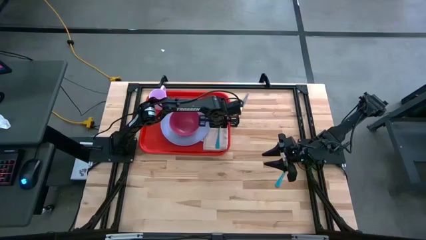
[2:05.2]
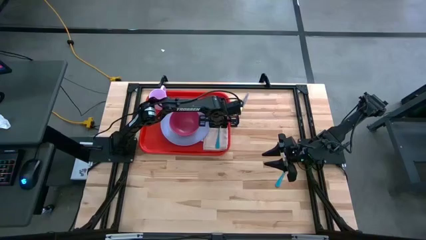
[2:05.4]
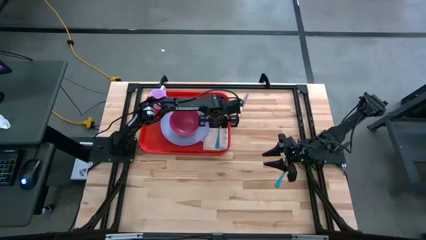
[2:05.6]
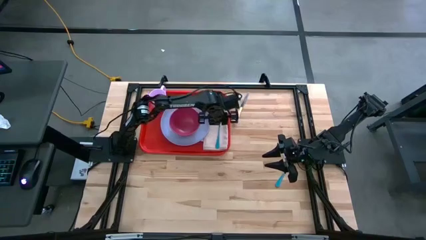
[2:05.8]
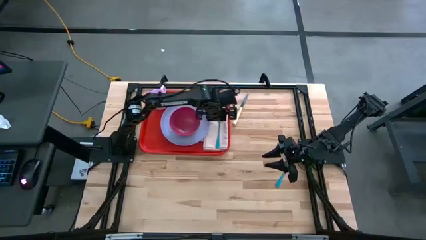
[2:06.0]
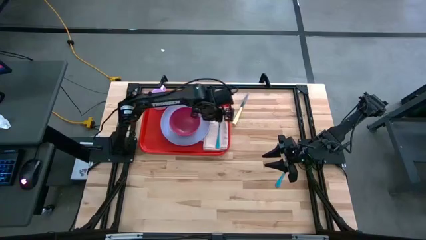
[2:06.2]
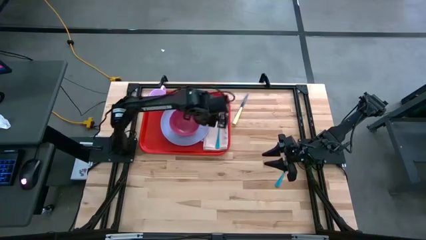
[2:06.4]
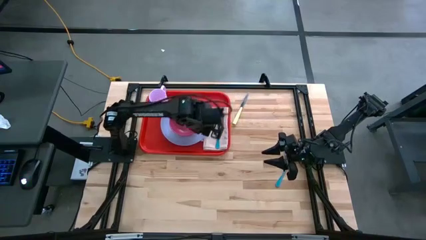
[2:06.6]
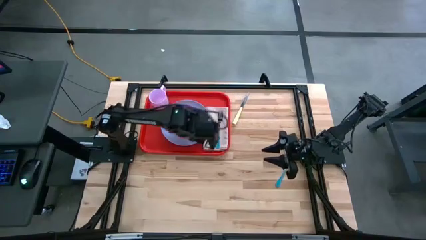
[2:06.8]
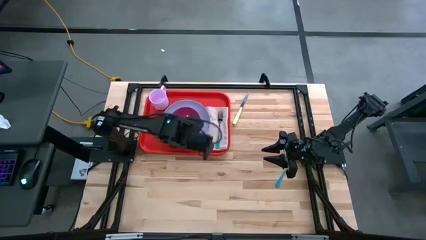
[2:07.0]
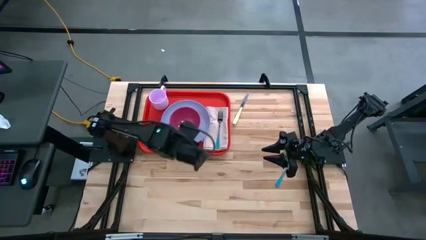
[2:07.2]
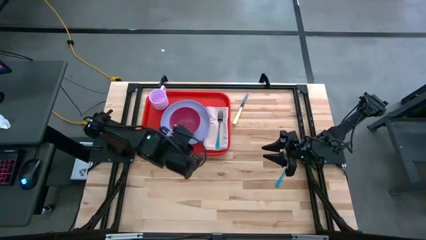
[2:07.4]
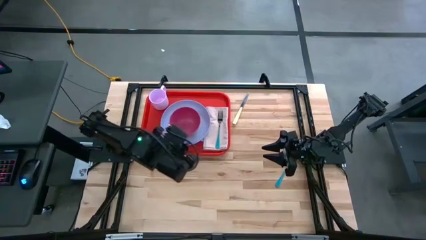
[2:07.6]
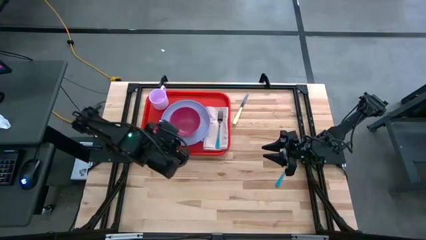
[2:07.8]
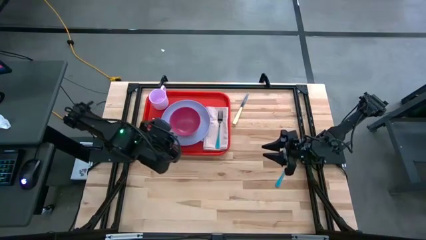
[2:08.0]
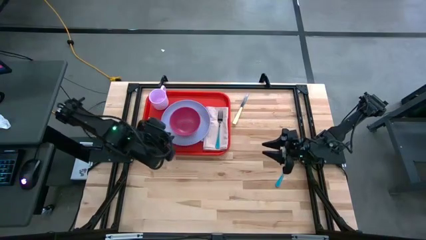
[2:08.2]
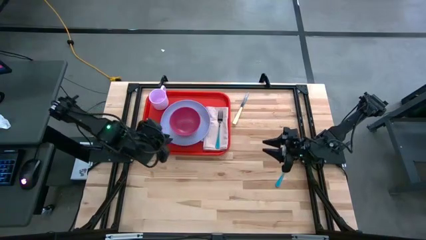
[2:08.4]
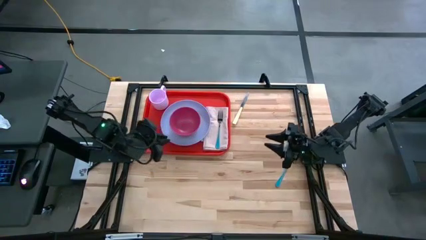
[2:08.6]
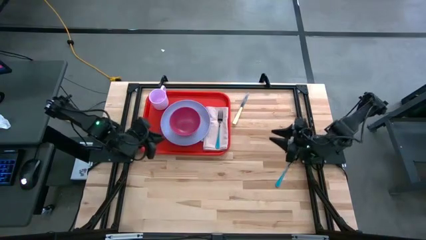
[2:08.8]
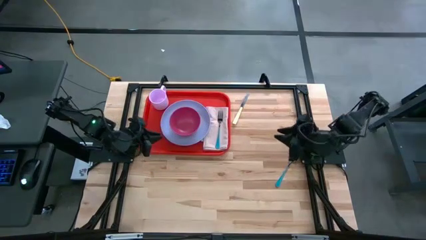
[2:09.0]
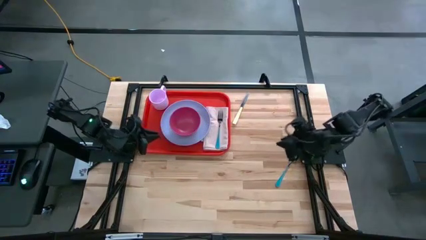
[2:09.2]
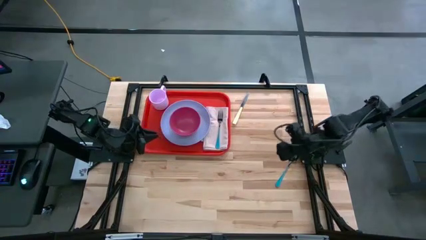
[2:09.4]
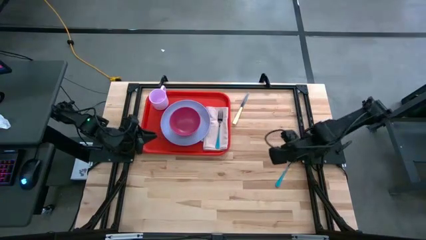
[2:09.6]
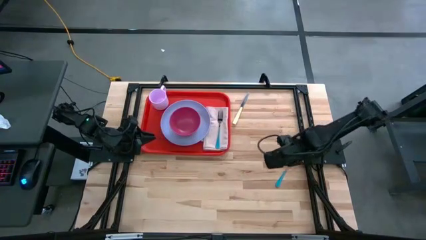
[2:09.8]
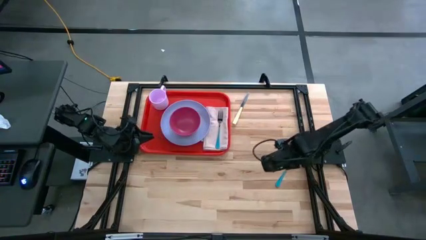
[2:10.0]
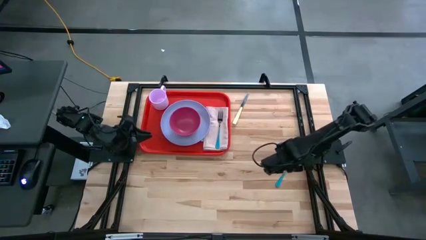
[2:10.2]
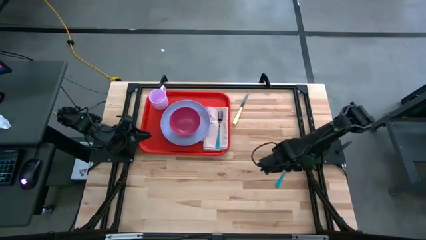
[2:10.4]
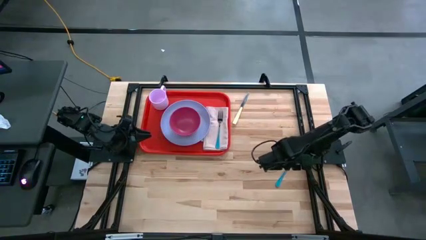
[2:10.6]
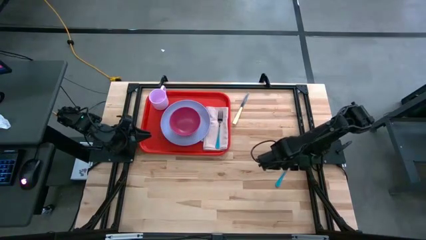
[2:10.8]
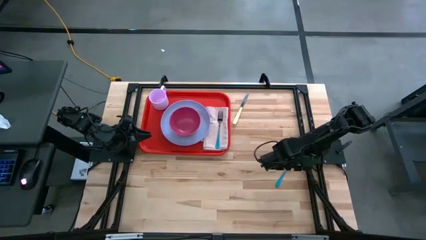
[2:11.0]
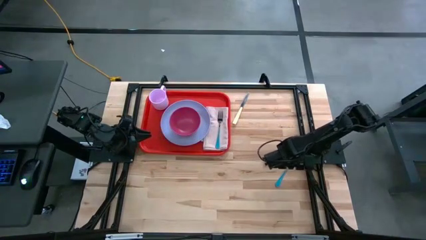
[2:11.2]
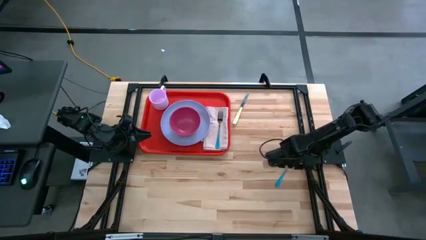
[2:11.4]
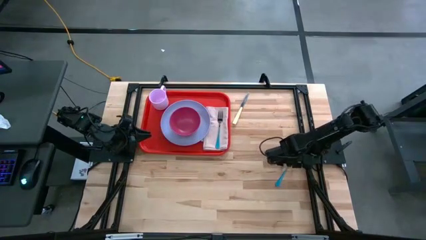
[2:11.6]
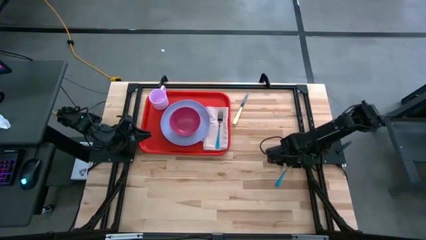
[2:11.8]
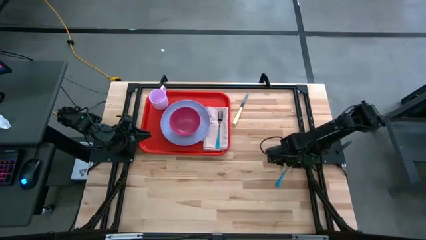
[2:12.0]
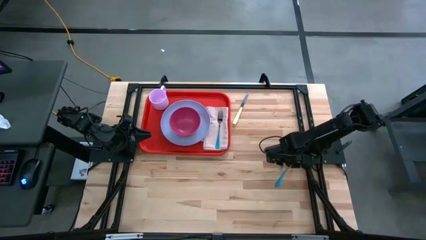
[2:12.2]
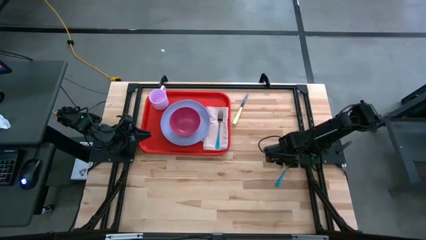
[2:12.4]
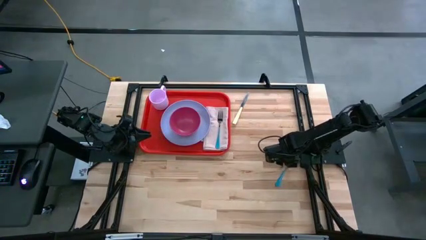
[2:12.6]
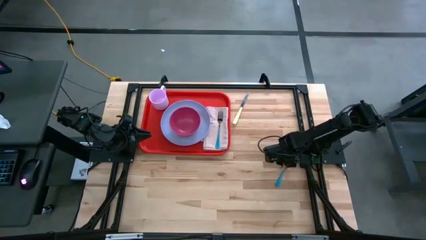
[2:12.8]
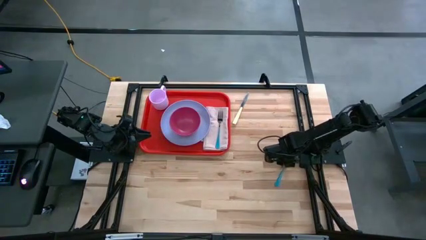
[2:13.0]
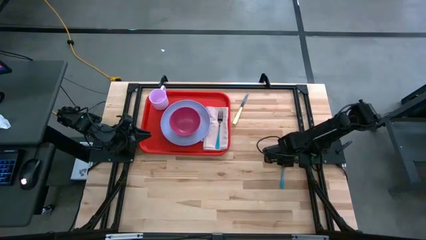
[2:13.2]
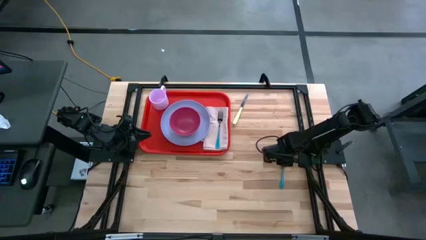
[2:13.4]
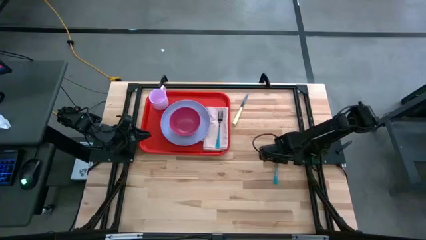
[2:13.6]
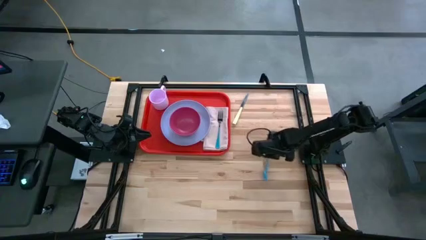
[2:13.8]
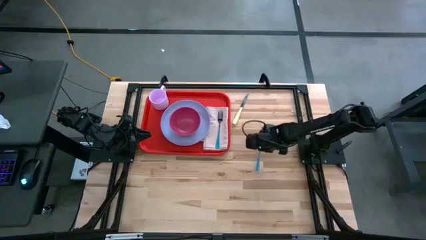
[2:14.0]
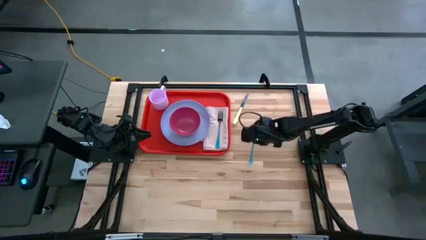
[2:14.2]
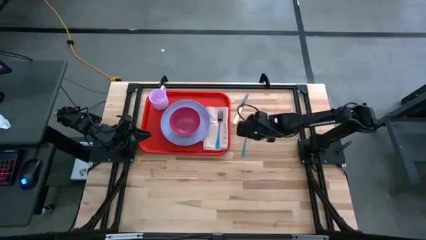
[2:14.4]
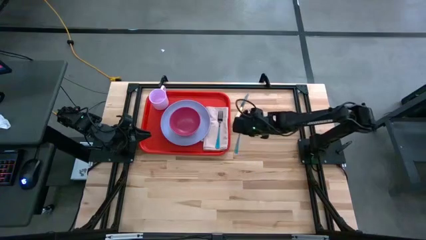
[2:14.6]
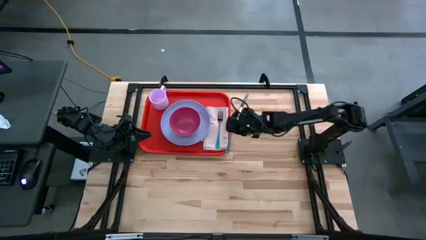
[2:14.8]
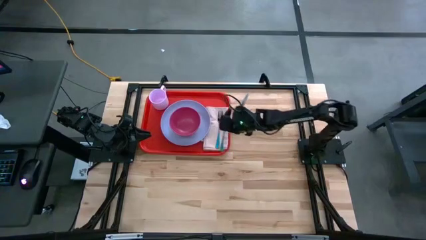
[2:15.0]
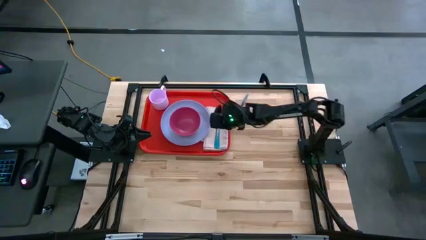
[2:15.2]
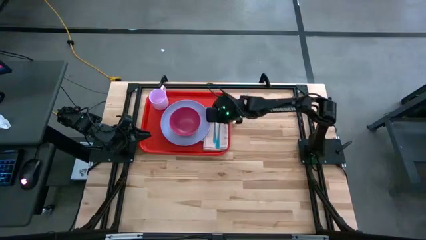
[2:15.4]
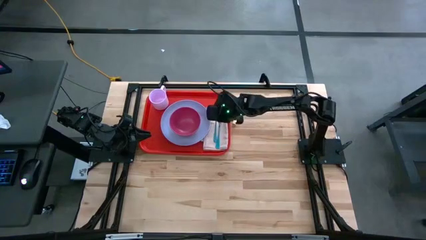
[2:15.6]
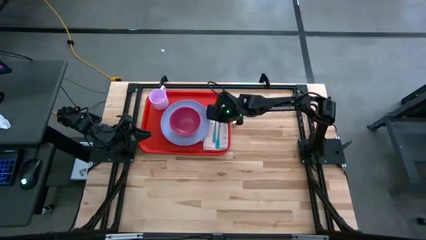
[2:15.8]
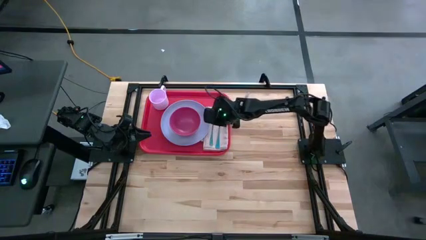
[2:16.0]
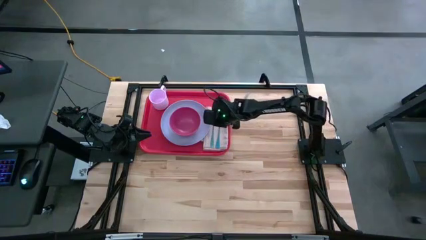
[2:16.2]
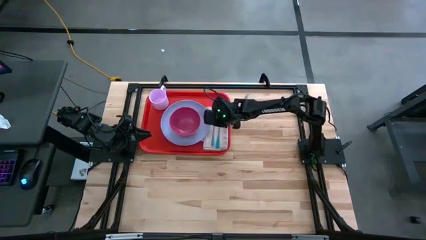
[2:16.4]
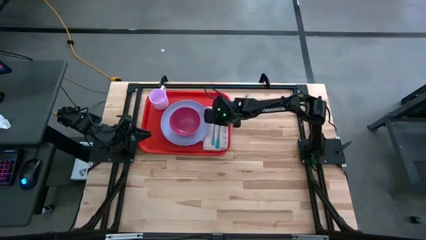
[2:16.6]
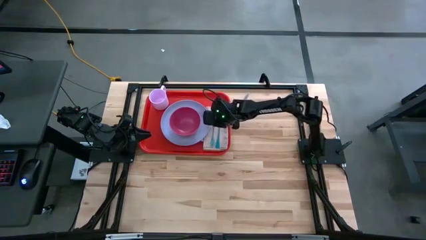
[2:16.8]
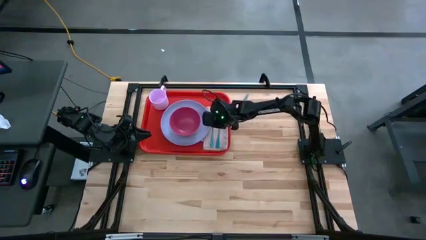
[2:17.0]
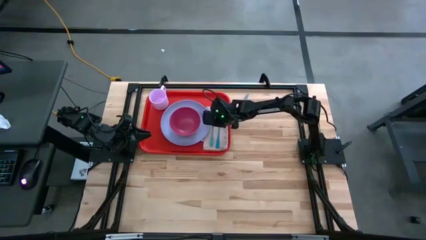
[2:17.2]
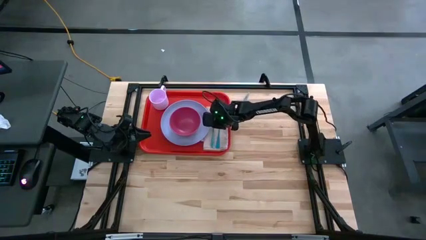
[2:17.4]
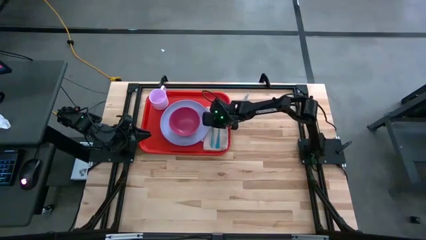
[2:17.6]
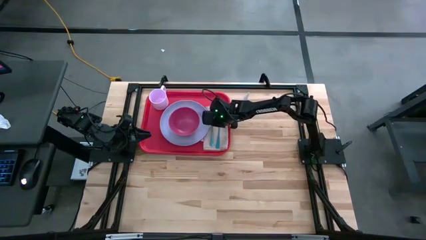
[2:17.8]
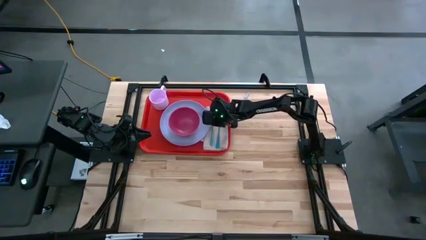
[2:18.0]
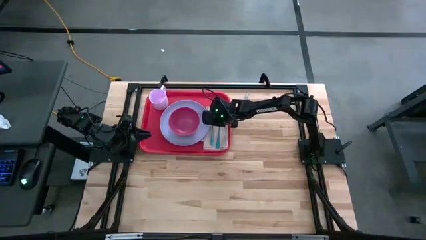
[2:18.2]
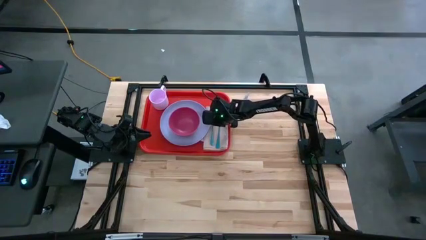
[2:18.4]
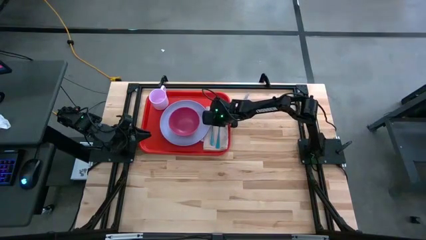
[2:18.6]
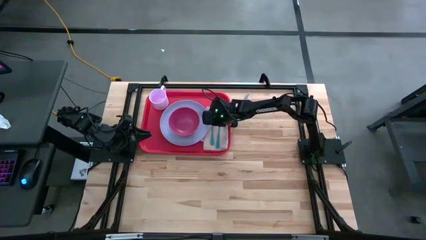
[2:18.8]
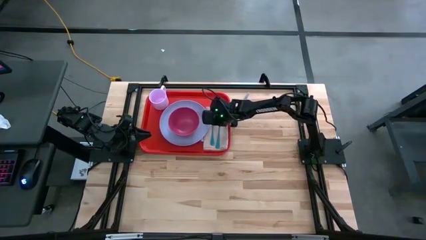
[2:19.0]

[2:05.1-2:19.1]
Task: Set up tray
Put the green spoon on the brown napkin to the left of the green fork

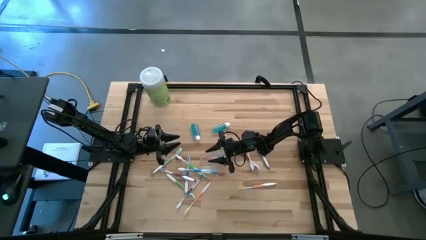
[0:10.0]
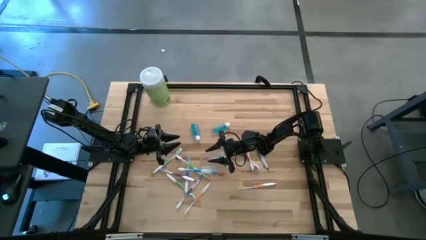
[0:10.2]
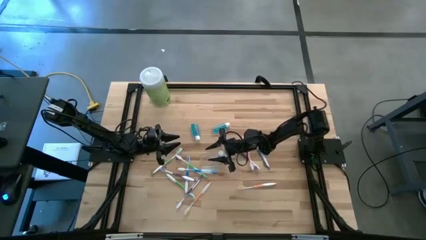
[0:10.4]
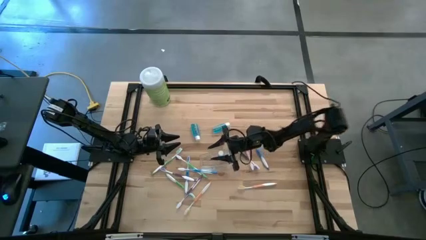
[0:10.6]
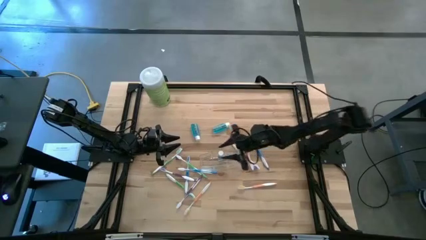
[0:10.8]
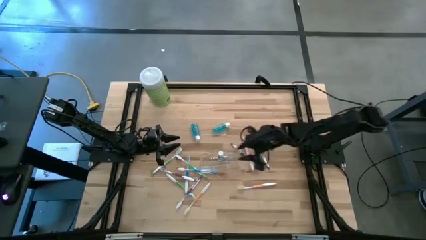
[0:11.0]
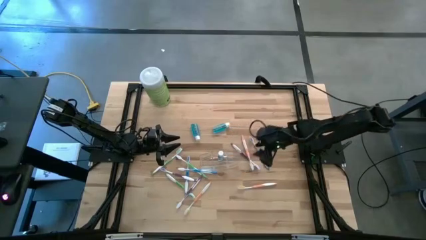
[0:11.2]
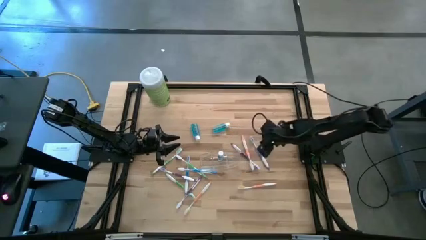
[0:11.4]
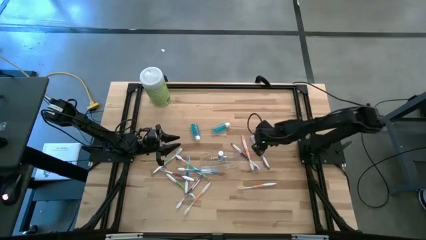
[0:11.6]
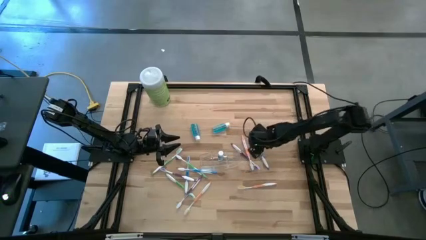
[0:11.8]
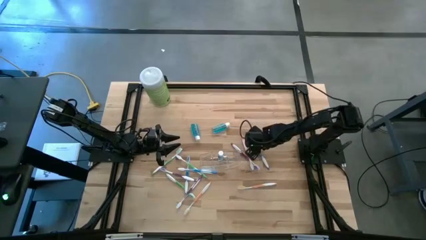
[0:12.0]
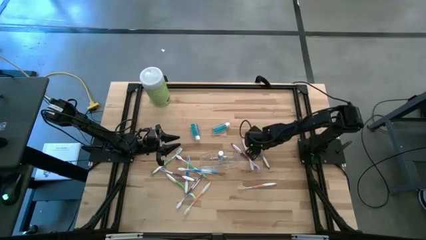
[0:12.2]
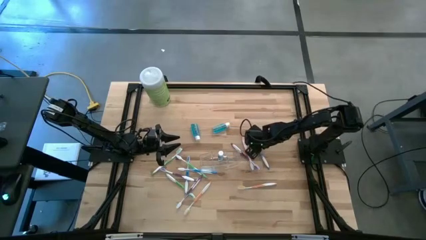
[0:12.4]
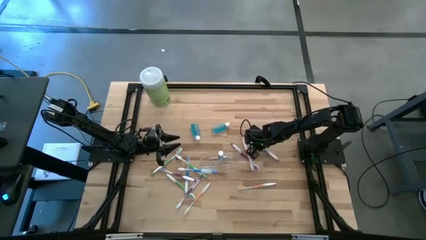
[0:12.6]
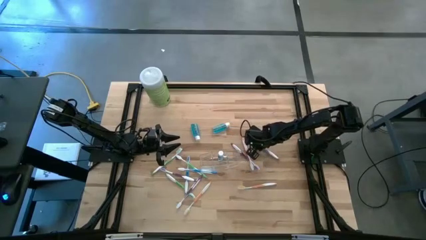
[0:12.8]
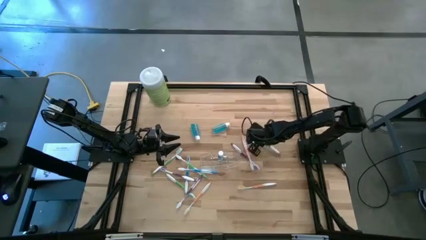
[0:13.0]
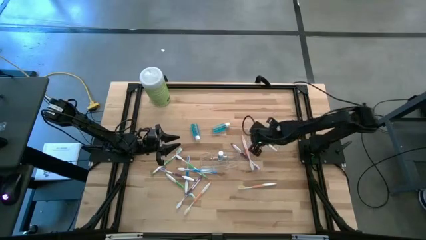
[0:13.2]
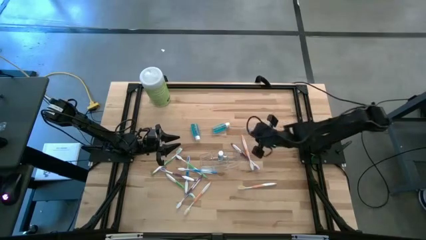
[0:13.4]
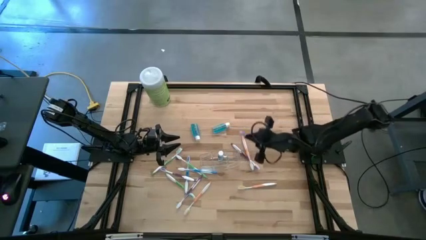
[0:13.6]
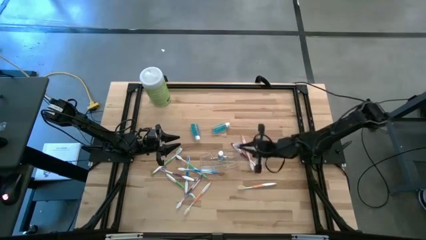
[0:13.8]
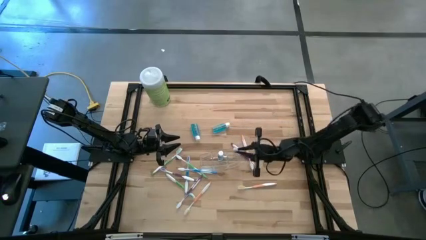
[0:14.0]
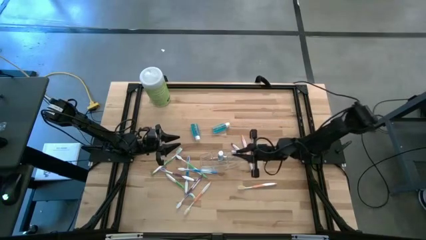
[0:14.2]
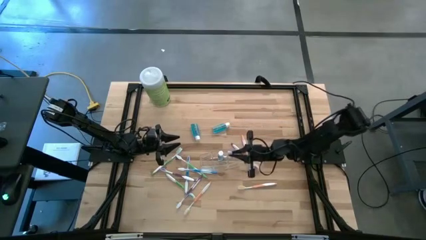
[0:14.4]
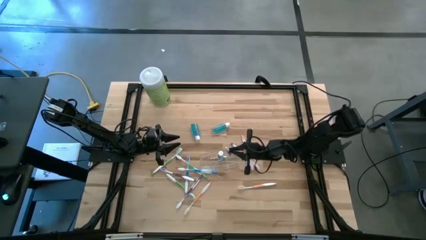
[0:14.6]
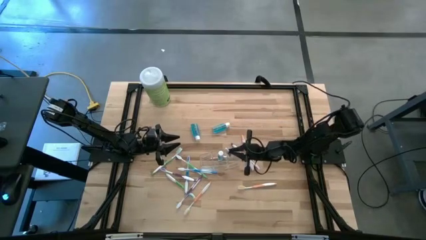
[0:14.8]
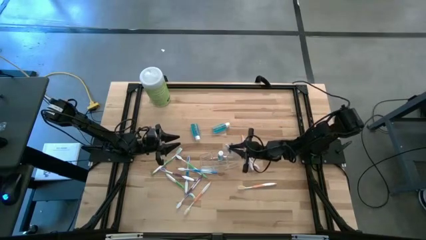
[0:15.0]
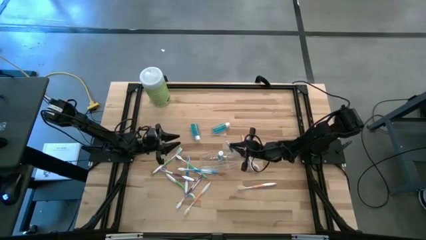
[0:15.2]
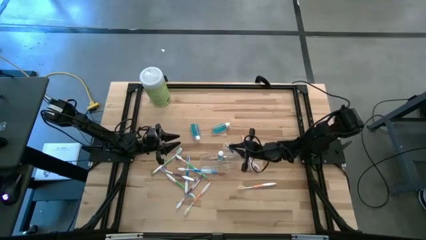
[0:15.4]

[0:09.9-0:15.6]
Task: Pick & Place toothbrushing station
Put the right blue toothbrush into the transparent organizer
